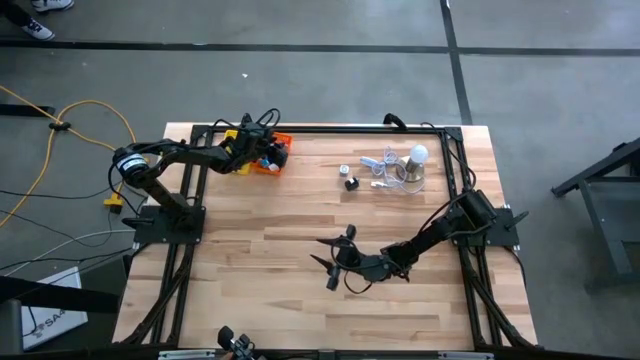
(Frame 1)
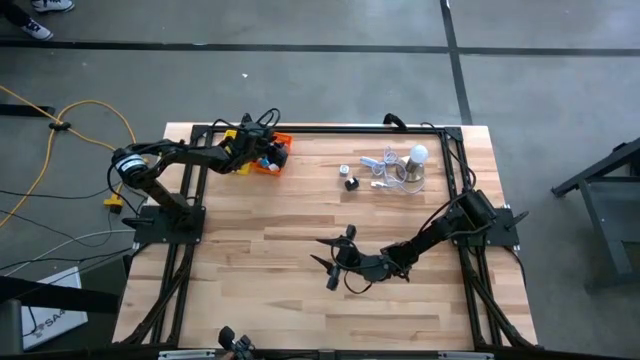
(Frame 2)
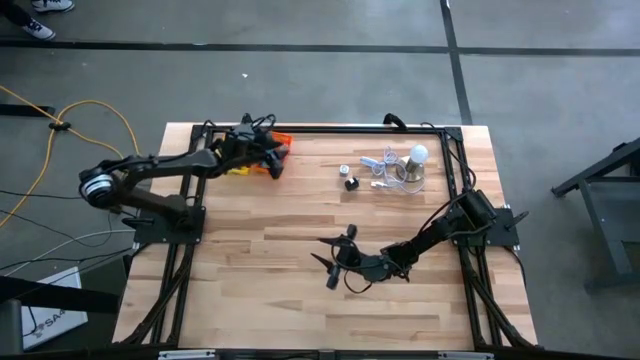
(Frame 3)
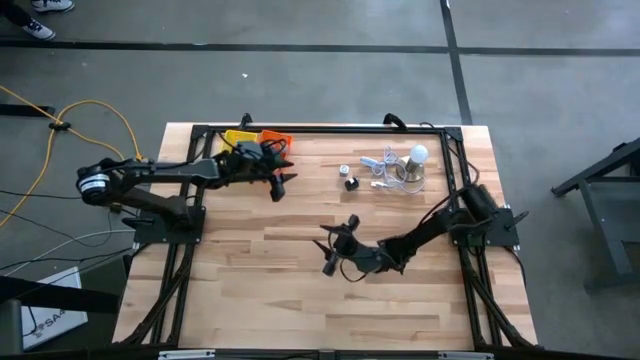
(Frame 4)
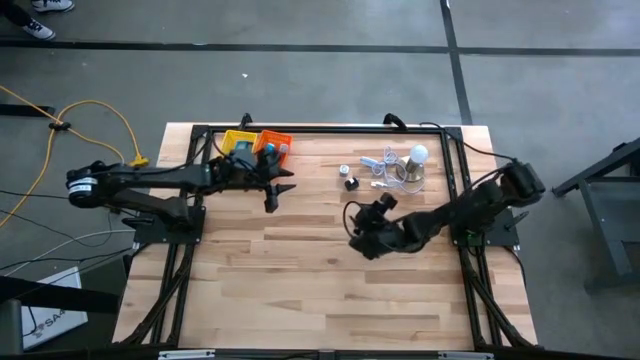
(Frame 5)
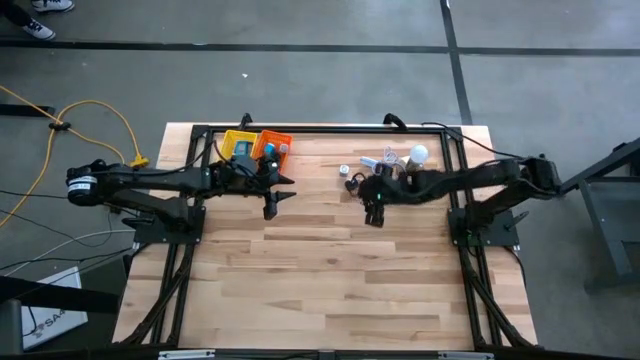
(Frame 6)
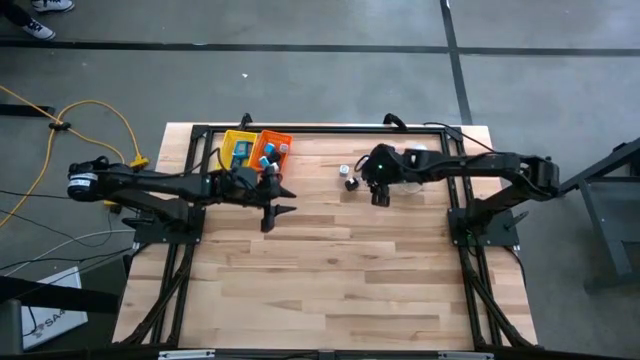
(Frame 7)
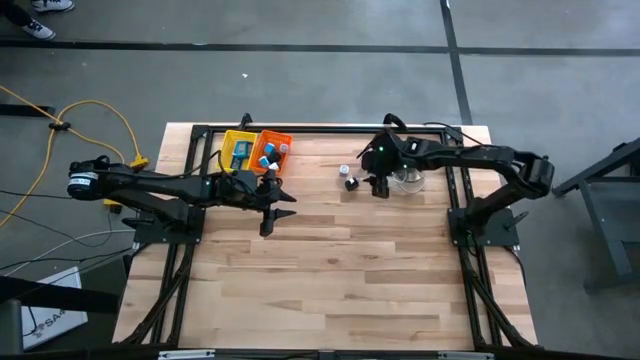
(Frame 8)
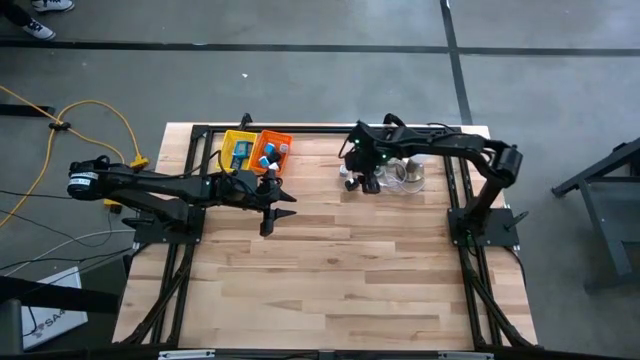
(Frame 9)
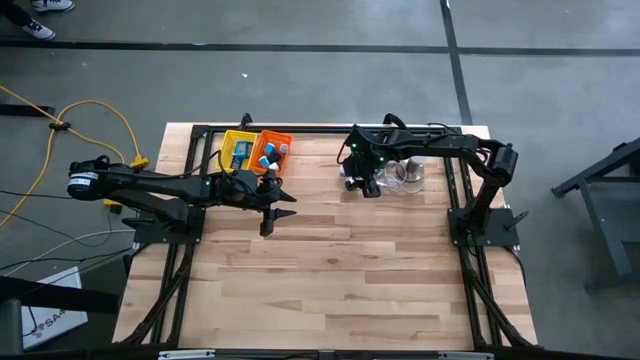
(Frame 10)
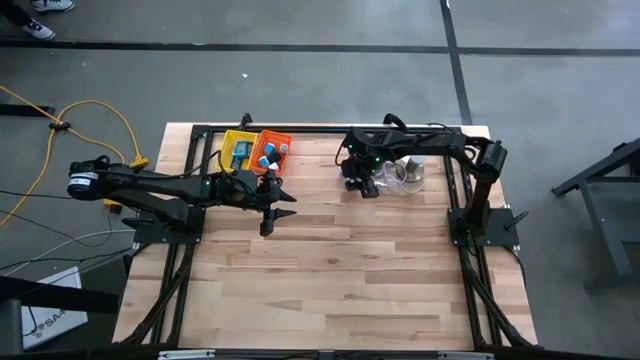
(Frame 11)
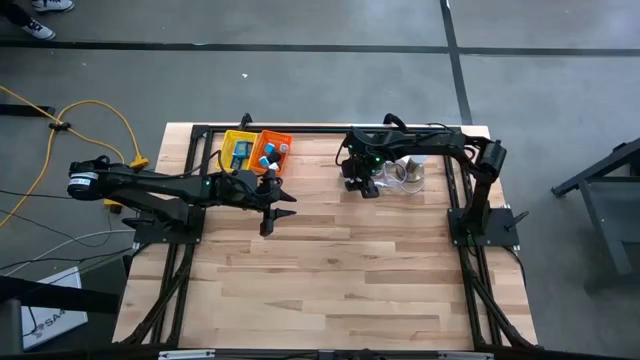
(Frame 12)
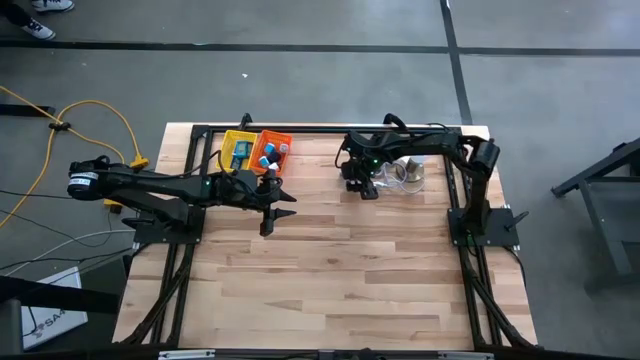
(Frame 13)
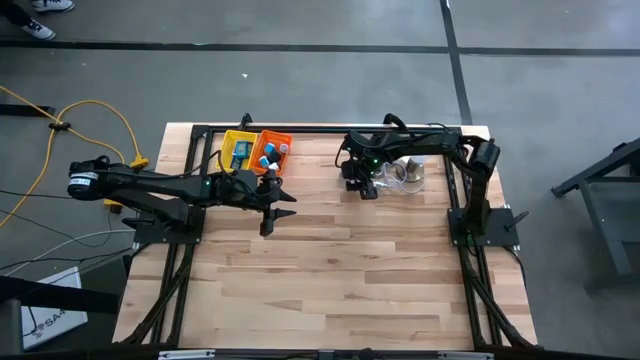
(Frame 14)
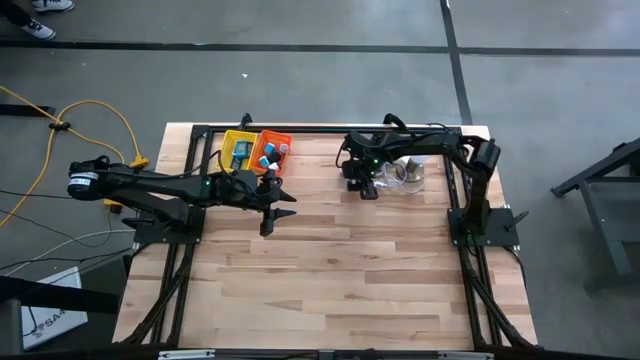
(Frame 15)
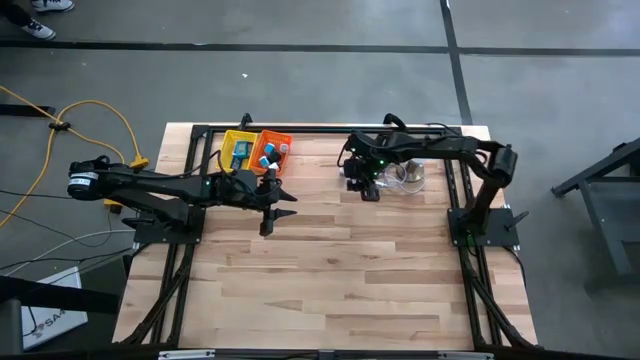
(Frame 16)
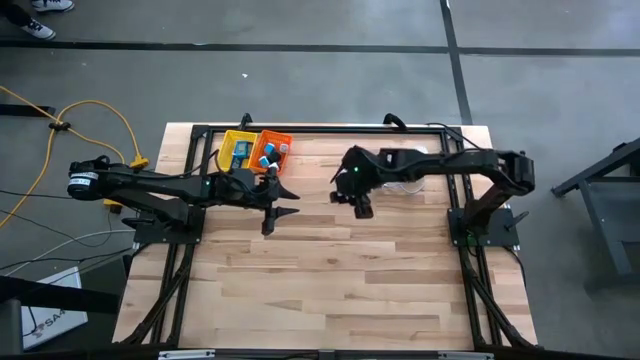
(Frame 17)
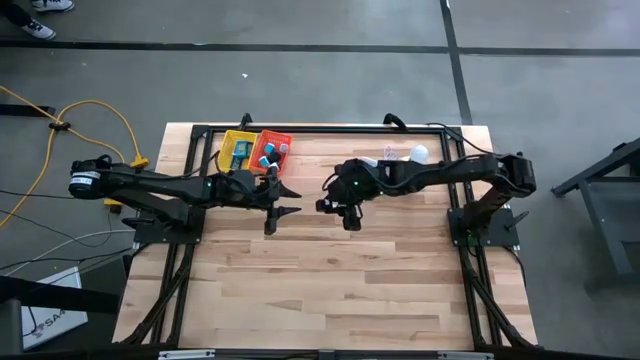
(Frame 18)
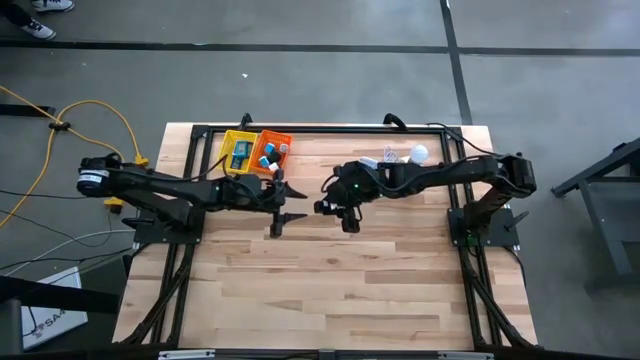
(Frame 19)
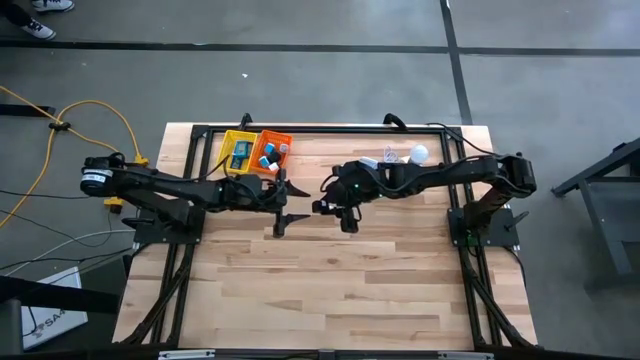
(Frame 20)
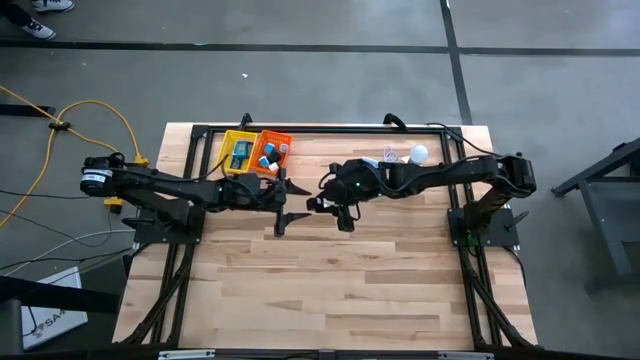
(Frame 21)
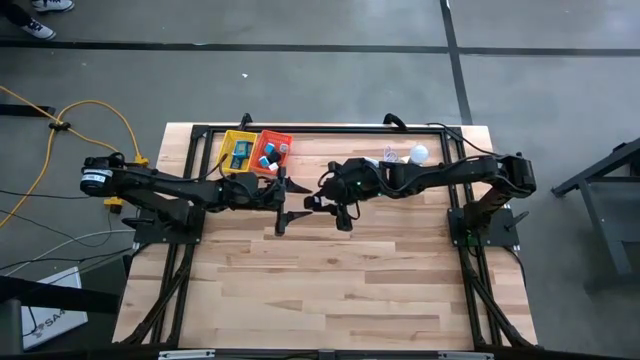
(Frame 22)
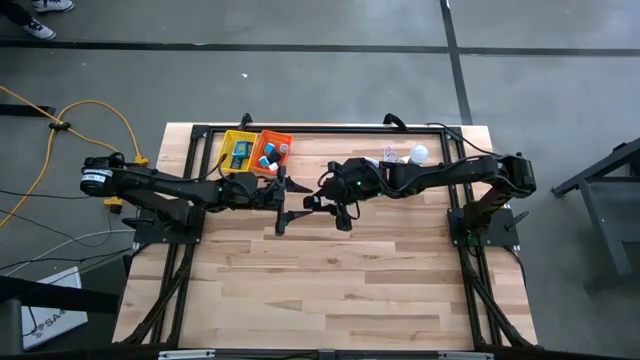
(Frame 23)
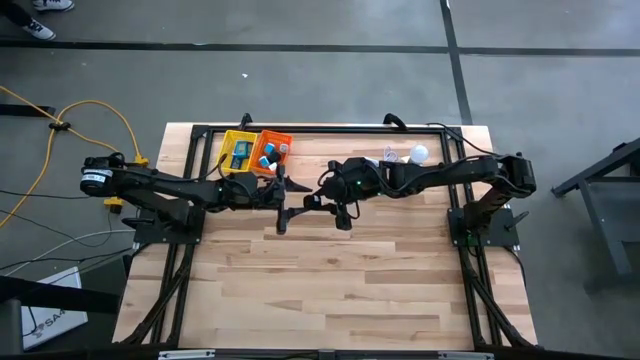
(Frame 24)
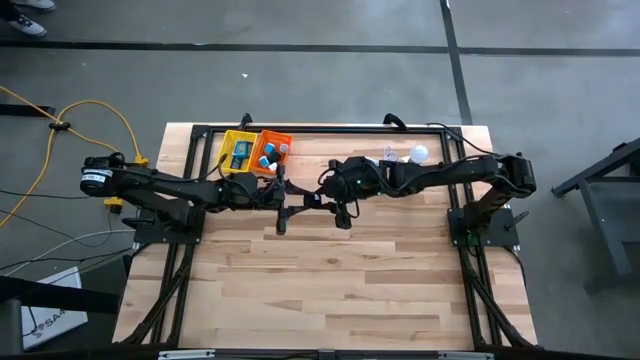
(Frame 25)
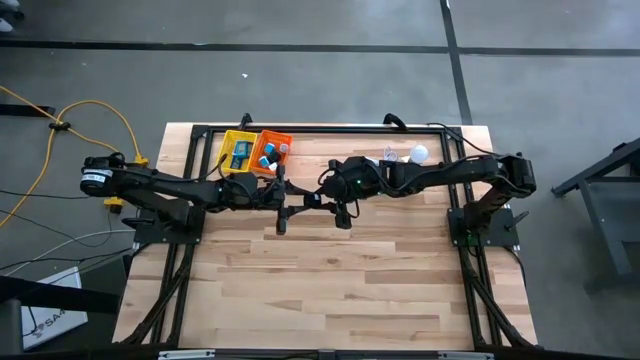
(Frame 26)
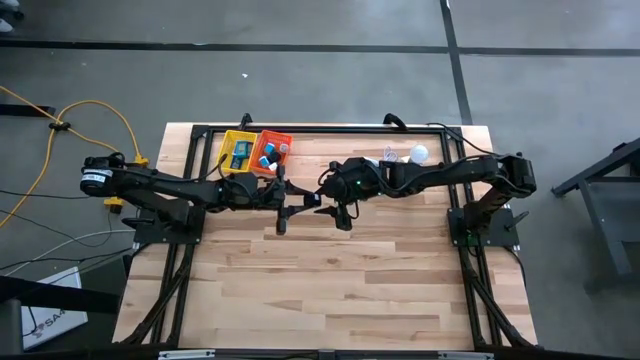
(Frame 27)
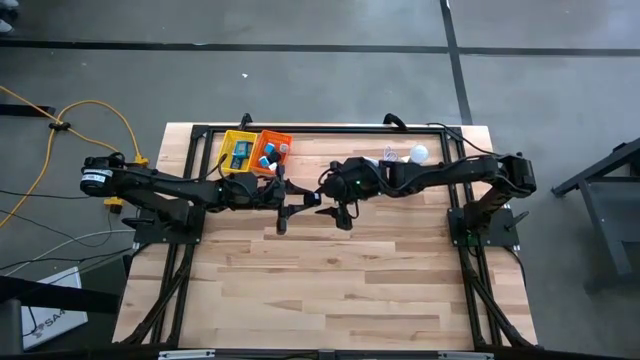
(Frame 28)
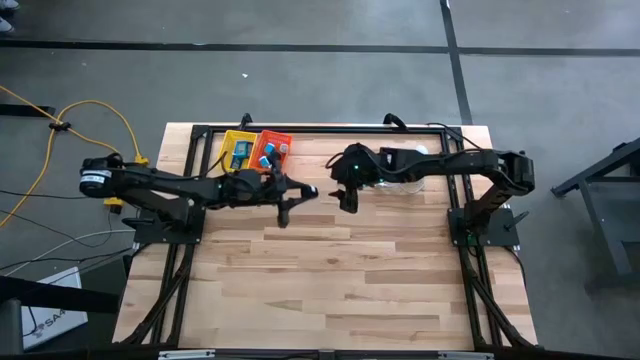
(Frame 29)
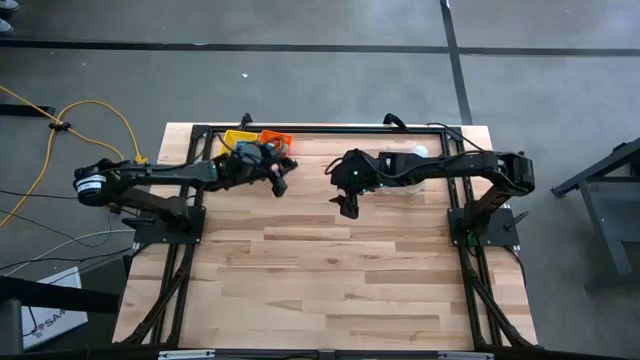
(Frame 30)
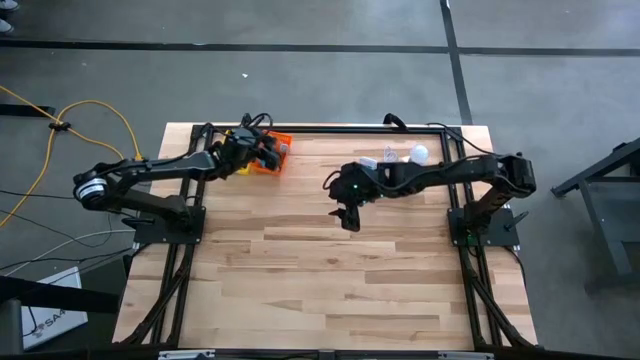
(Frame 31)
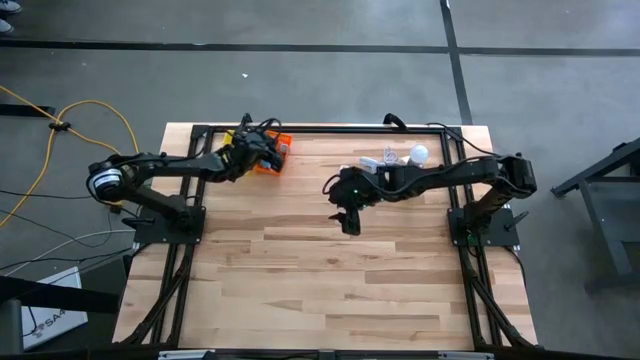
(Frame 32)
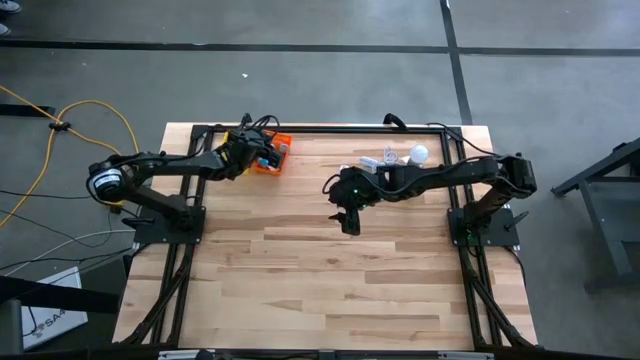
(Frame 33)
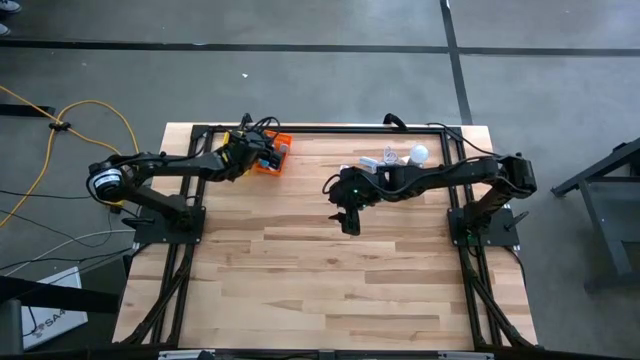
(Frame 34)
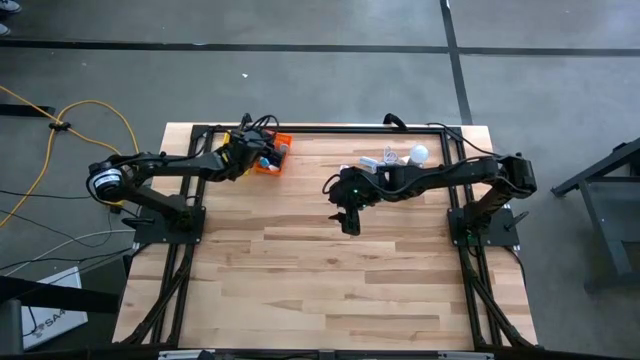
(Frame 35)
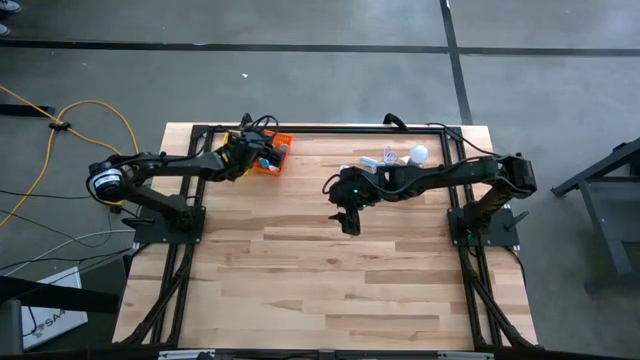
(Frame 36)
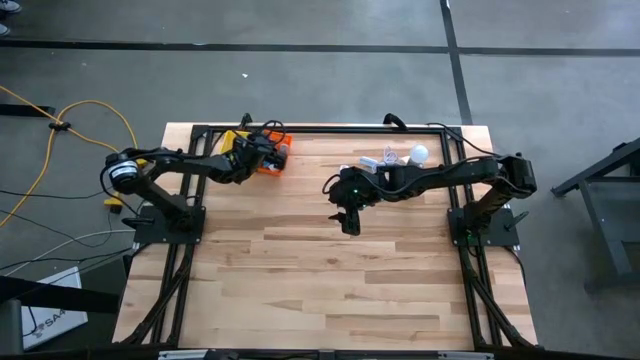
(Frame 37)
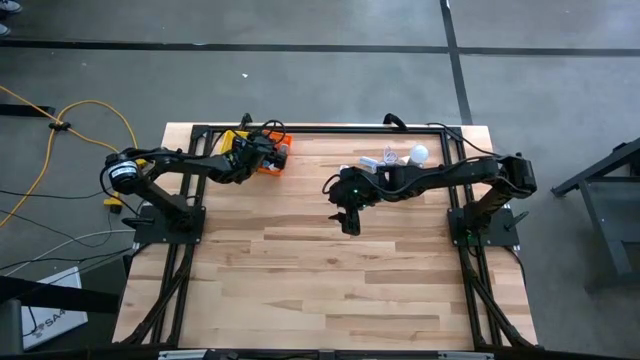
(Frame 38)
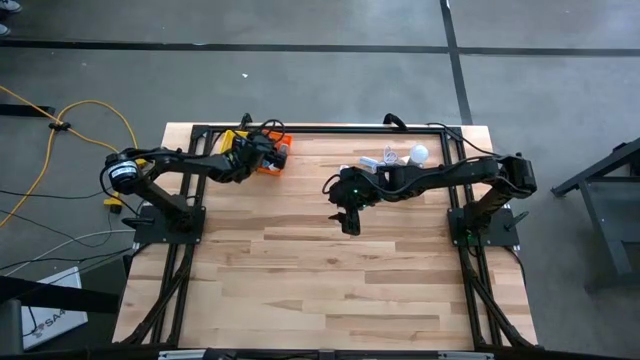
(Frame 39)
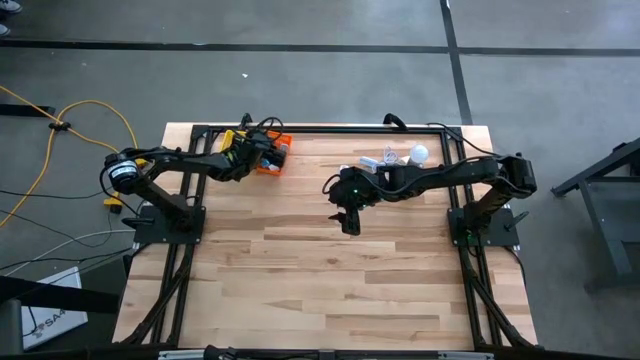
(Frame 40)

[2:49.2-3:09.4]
Task: Pick & Place Office items
Put the black adapter into the orange basket

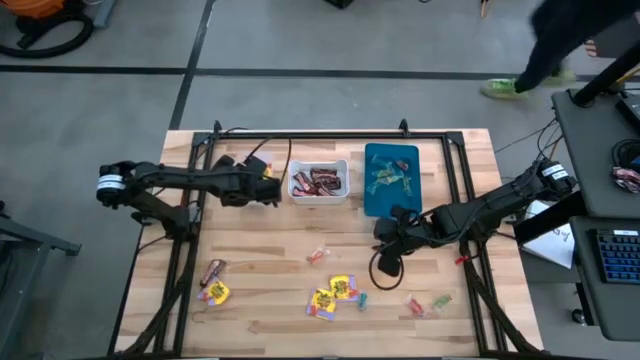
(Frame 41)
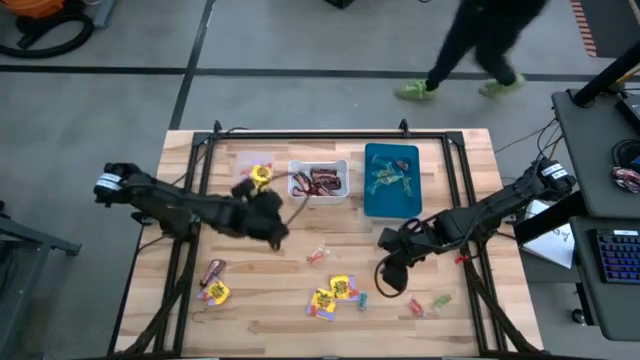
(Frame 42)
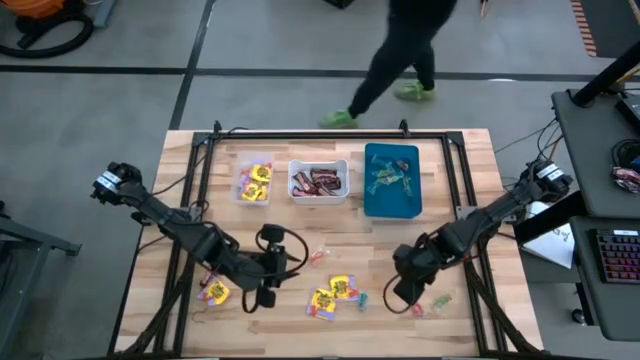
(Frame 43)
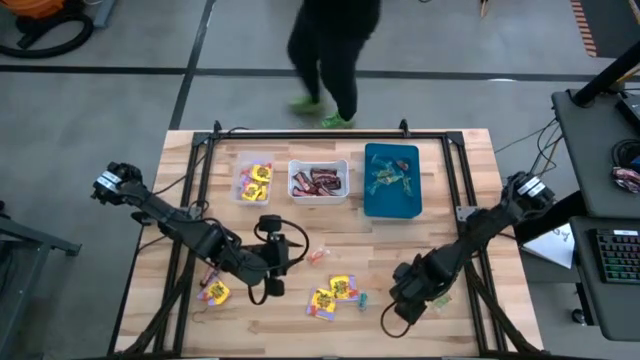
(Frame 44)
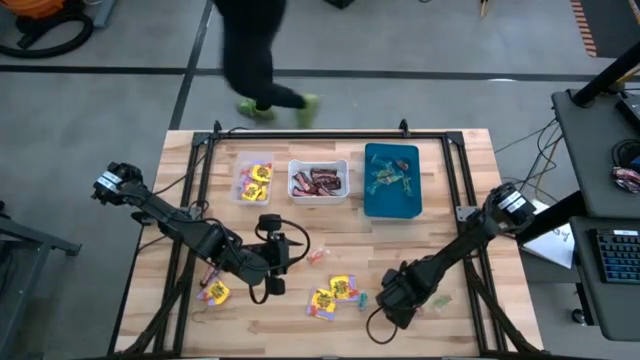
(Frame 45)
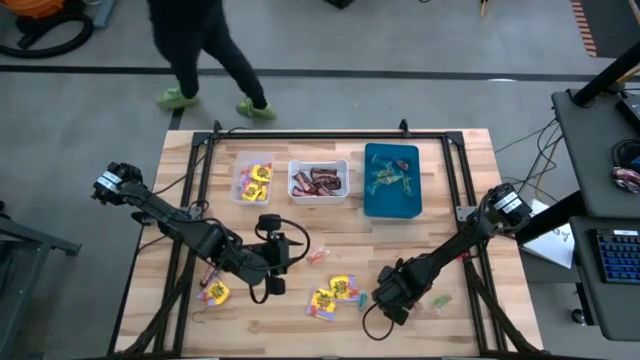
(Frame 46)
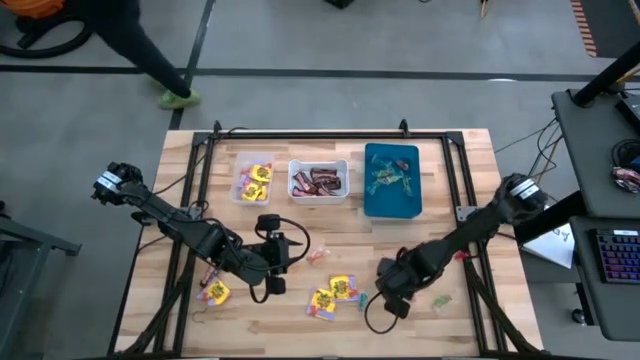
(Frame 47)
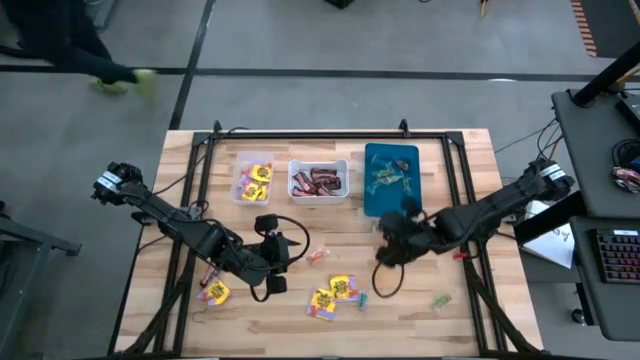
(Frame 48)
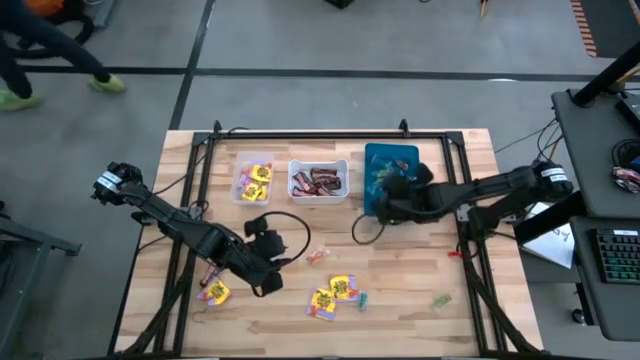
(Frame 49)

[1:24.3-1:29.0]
Task: Sort candy
Put the red candy into the blue bin
